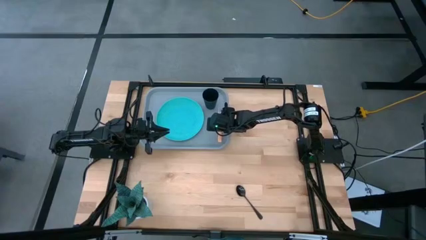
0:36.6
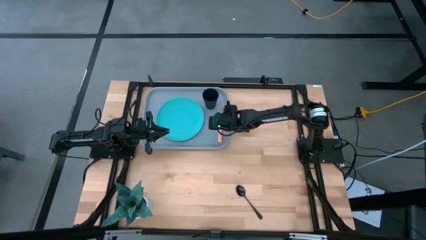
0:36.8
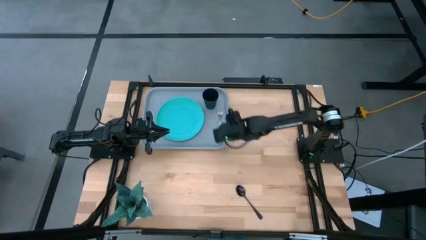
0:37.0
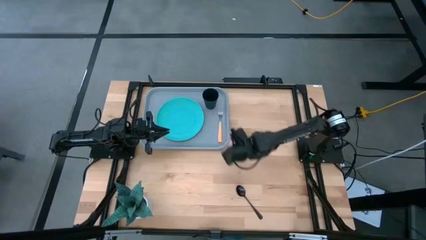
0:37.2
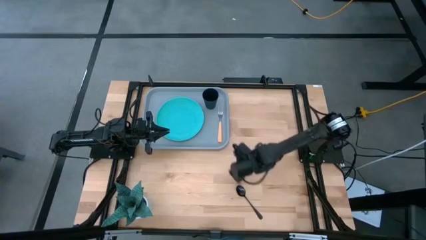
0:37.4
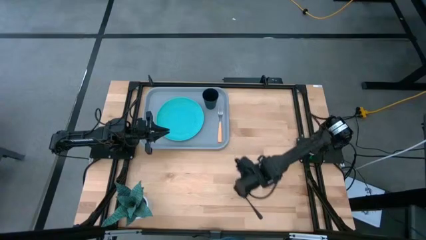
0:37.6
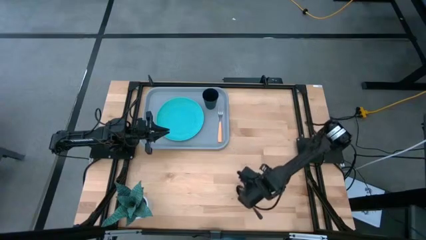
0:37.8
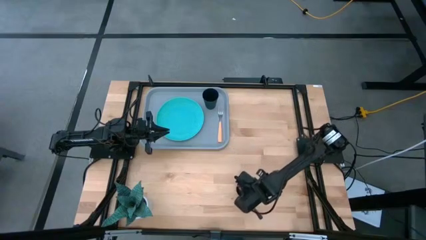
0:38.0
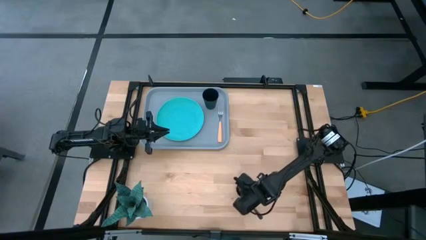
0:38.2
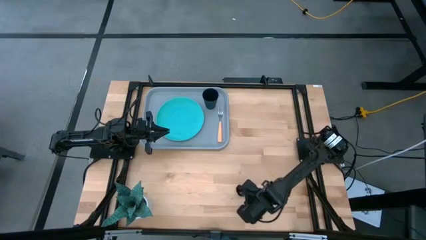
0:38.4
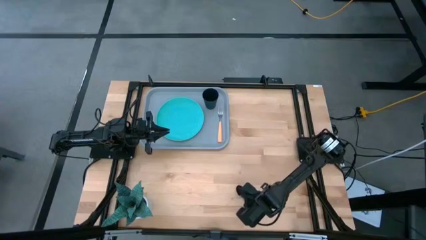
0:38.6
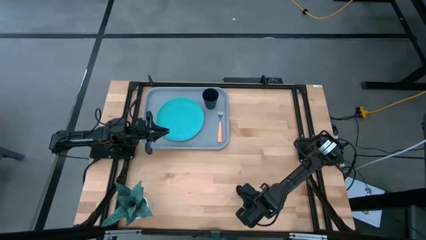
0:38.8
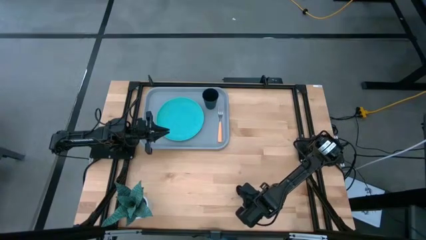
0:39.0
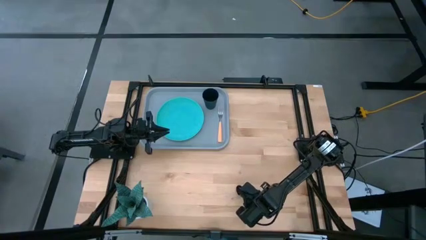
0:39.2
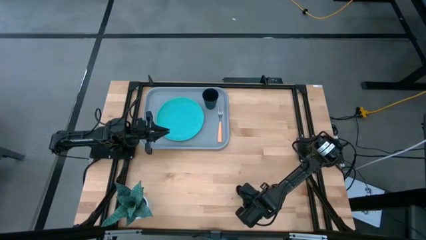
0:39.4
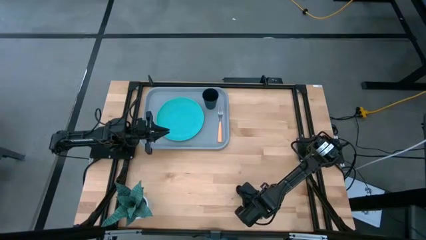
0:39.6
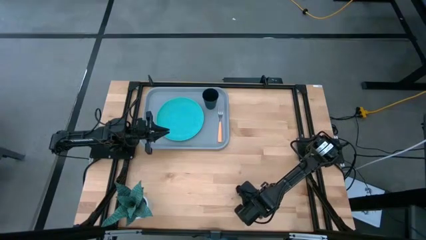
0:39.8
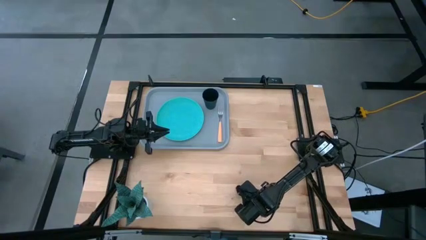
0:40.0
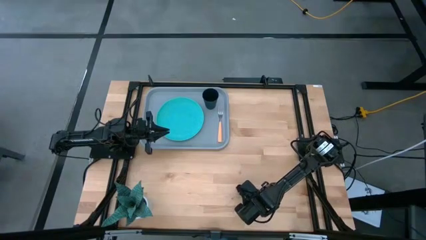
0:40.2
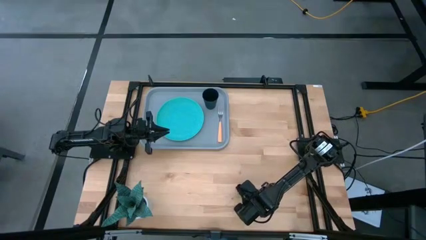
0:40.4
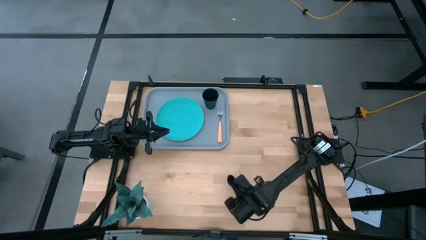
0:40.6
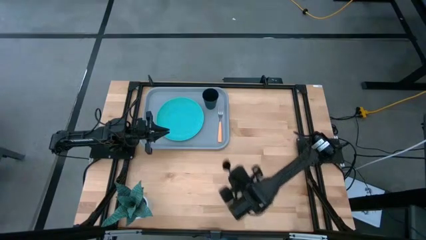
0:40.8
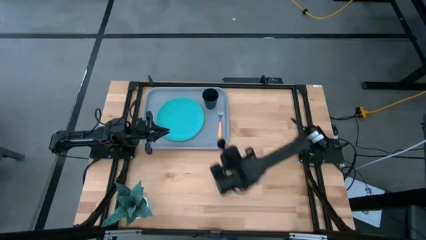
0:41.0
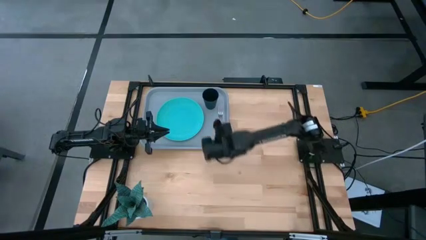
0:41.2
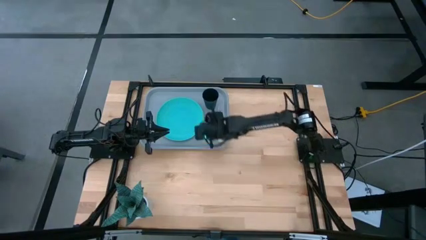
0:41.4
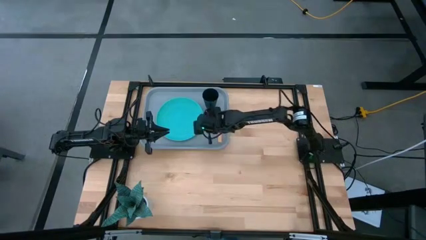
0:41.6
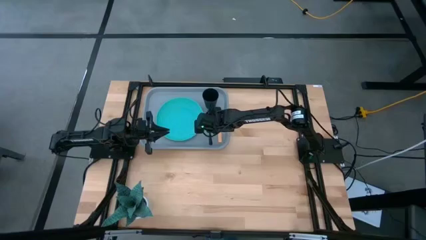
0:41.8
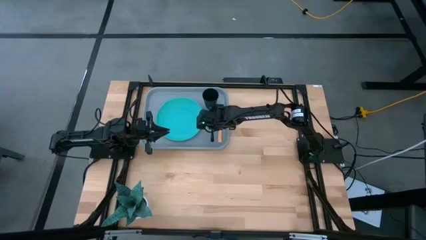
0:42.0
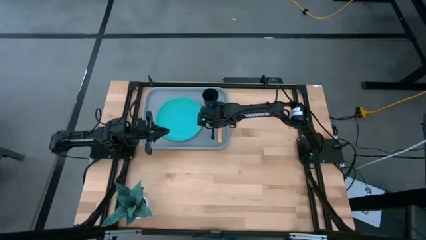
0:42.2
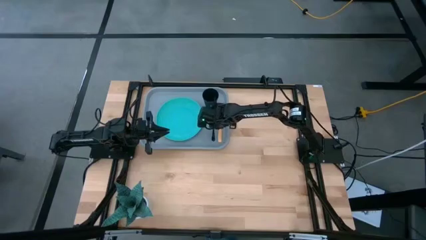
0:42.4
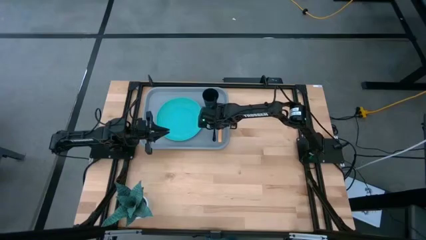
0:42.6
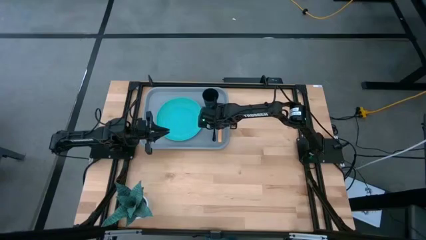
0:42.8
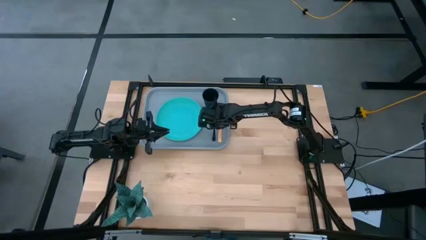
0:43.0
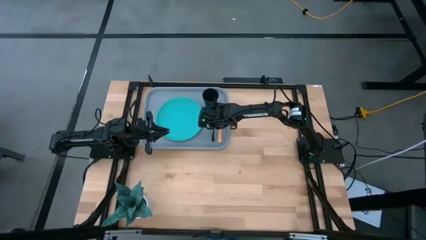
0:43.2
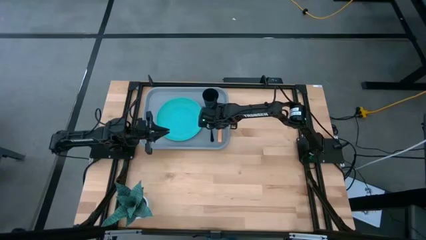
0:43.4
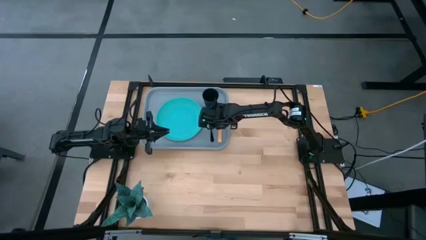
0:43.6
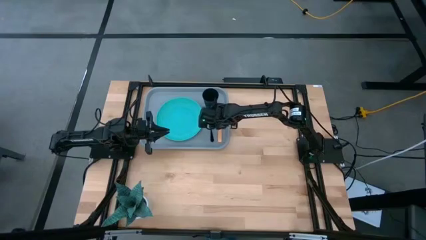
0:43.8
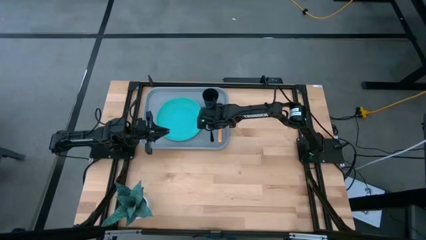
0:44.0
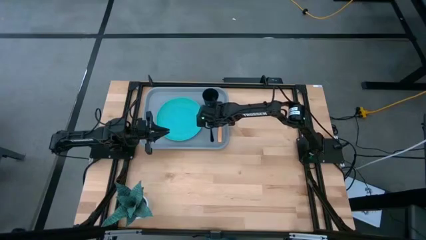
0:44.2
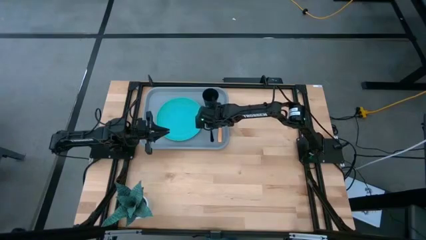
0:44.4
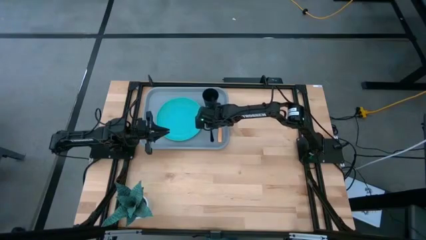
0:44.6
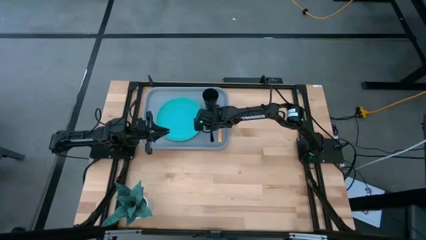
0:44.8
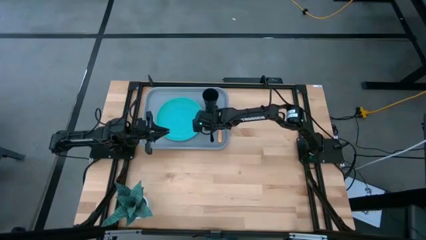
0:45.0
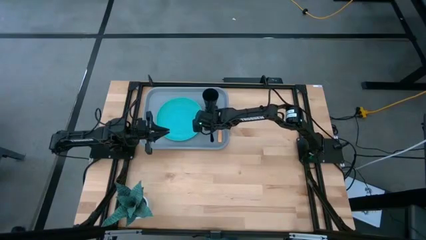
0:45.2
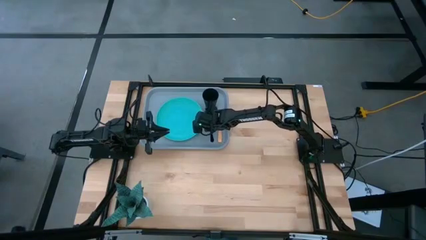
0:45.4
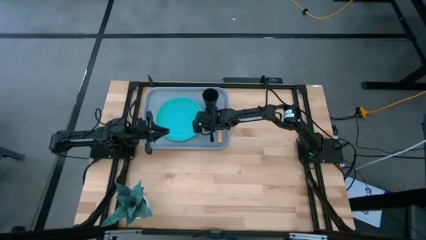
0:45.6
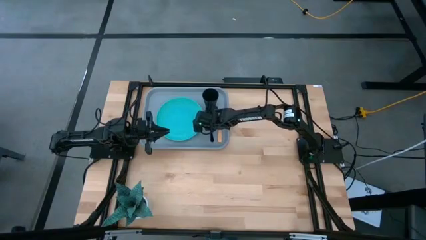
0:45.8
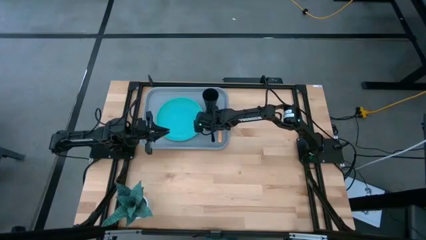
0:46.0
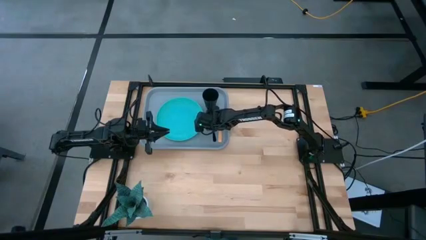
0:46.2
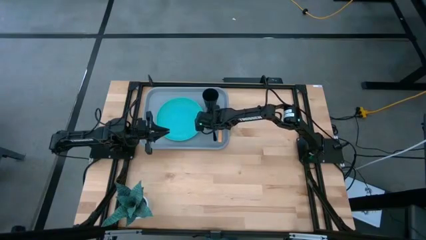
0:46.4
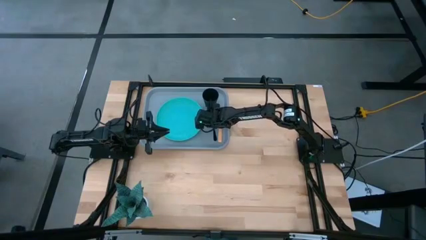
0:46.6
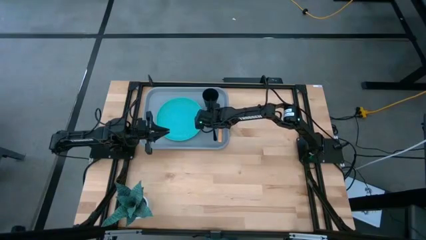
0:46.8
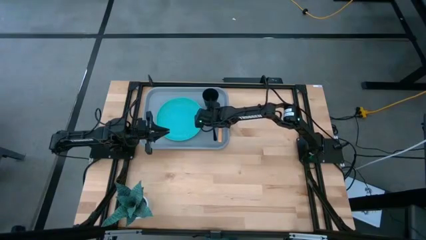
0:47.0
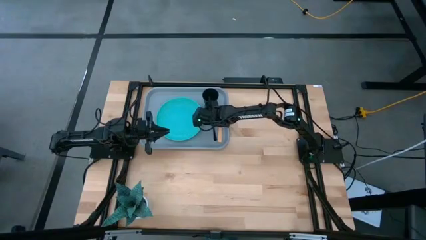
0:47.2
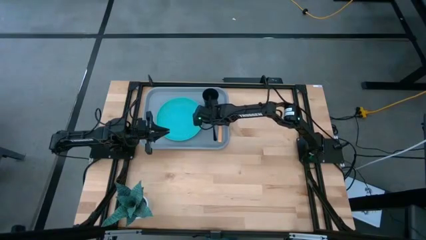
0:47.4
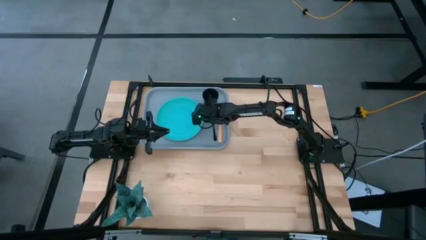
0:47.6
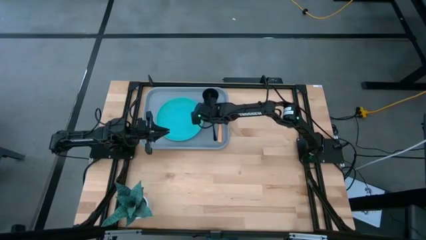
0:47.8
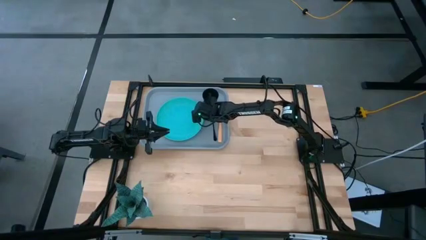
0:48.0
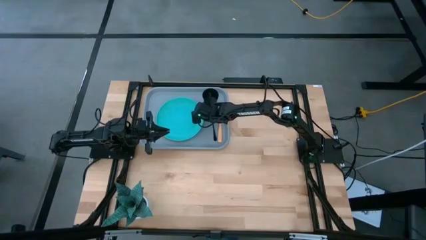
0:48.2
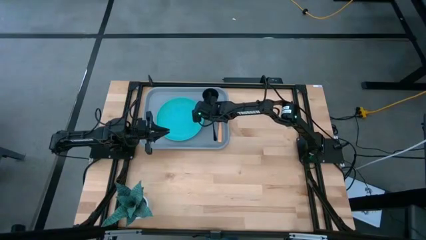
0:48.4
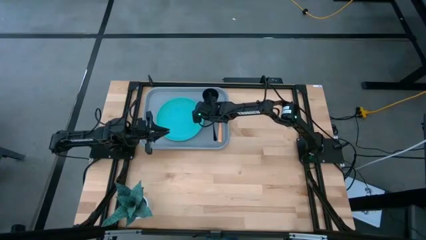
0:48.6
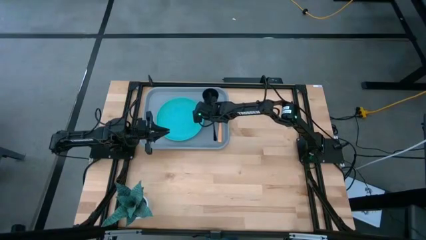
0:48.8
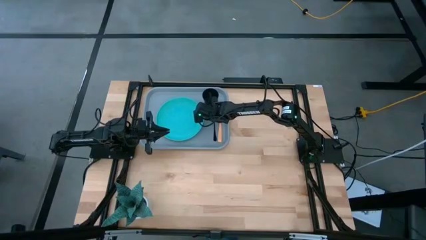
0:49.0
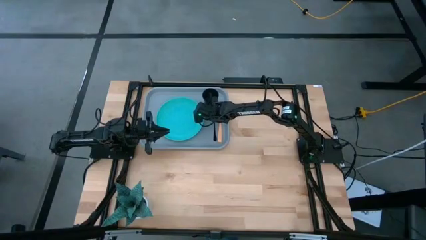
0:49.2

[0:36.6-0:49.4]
Task: Pick and place plate/cup/fork/spoon on tray
Put the black spoon on the serving tray to the left side of the orange fork
